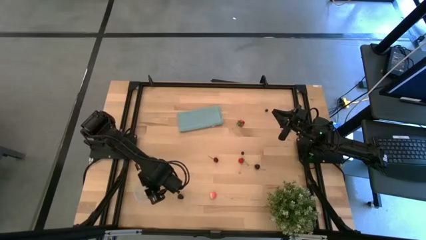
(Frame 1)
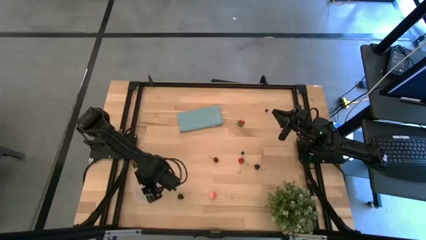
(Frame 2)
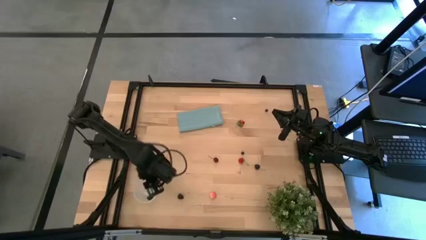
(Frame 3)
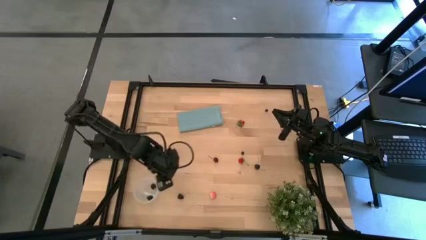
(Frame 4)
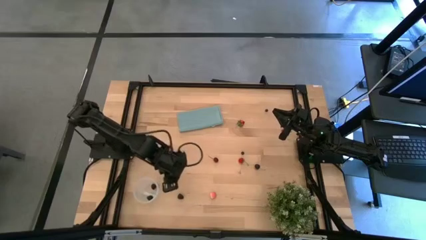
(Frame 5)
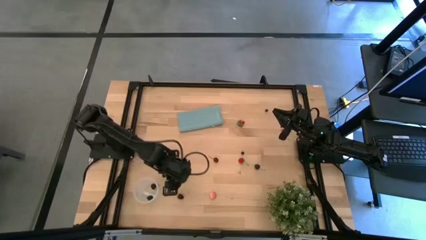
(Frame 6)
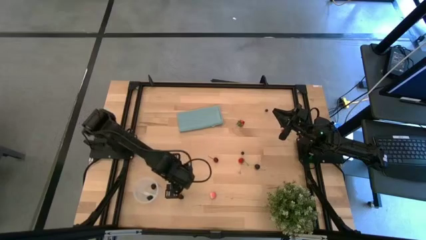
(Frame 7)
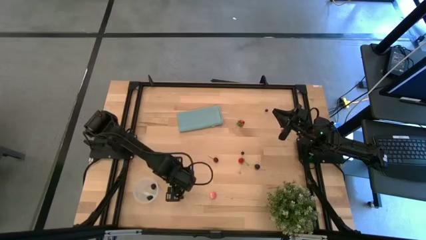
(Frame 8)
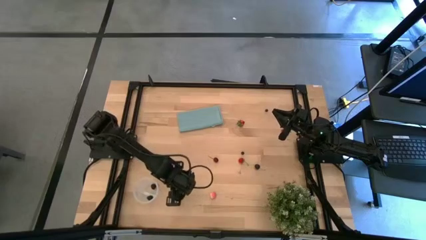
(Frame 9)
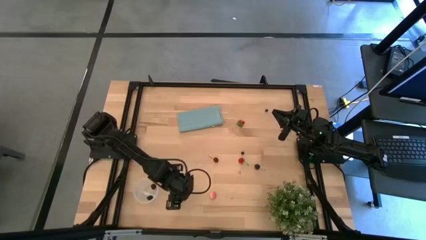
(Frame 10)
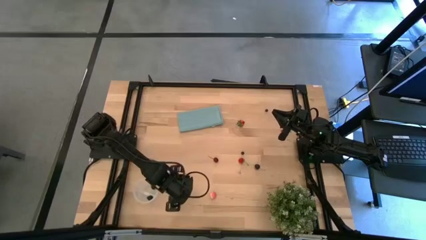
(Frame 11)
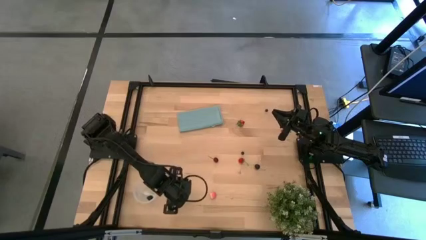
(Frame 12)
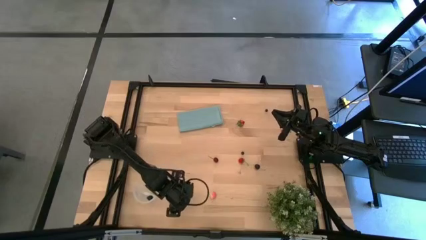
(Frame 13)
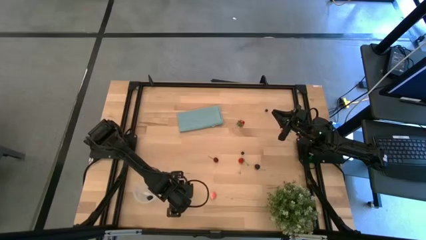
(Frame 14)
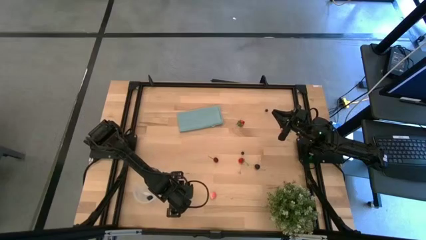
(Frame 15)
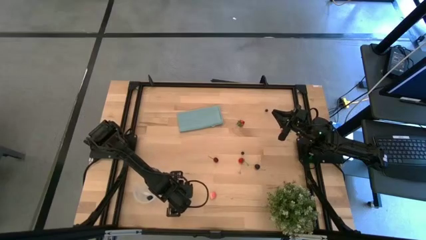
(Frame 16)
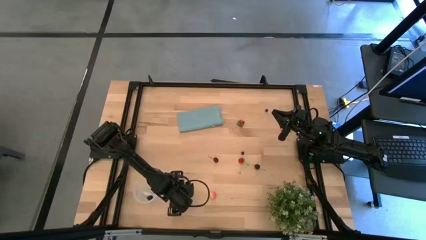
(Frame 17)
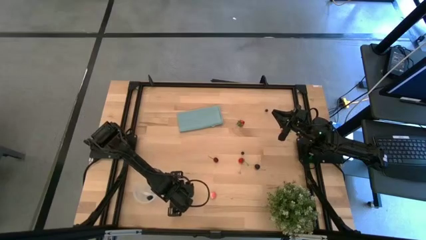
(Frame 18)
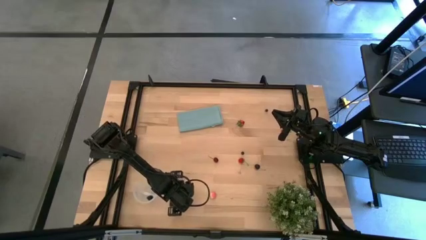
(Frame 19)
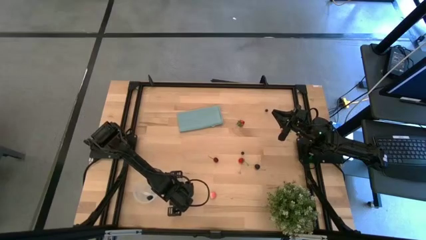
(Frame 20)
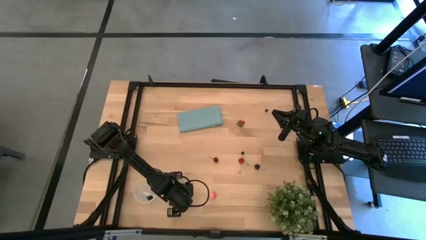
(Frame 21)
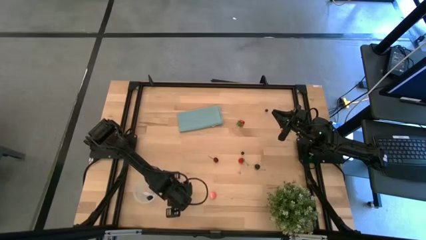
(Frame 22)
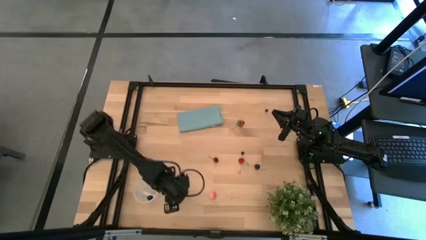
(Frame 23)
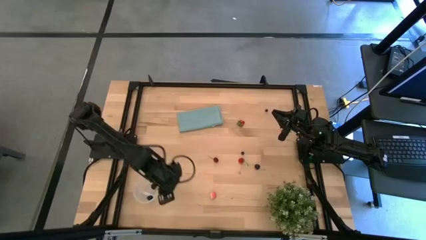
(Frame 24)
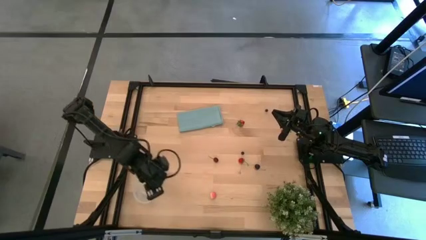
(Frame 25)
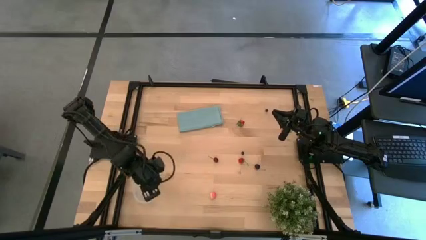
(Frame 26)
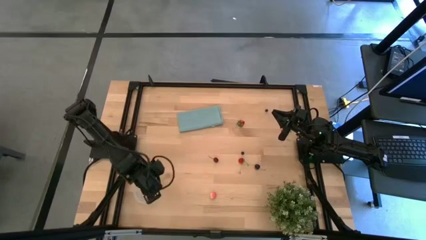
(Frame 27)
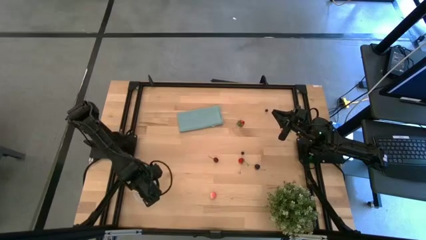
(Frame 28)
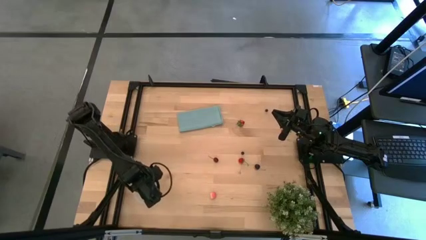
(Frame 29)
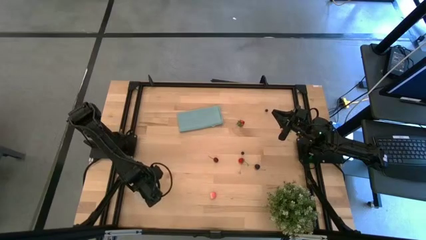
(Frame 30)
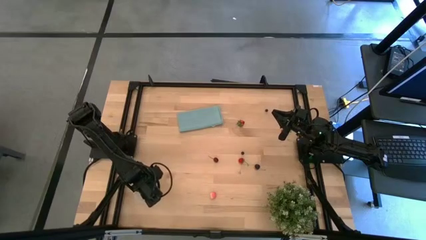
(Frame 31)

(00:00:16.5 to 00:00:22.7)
Task: Pick and placing Produce into tupperware
Put the blackberry into the transparent container

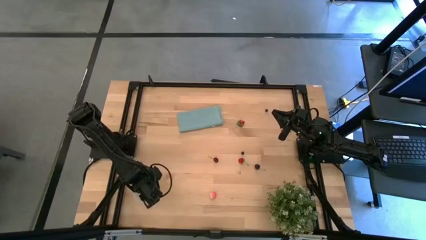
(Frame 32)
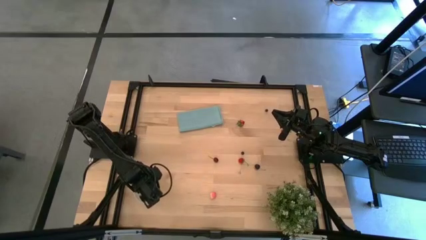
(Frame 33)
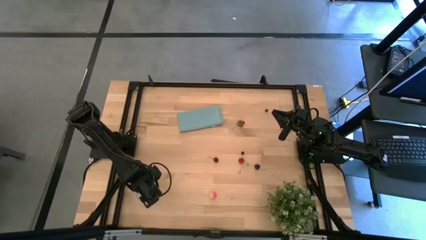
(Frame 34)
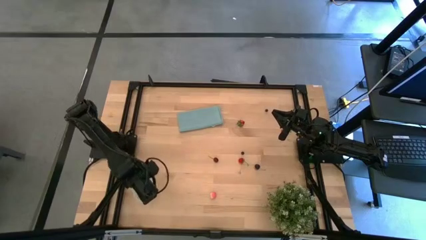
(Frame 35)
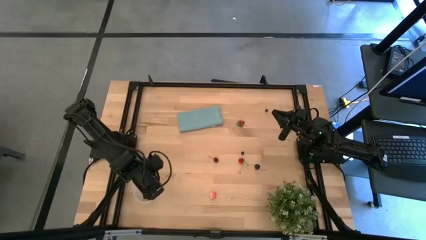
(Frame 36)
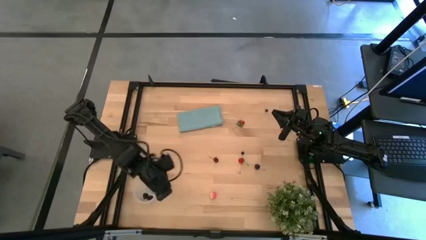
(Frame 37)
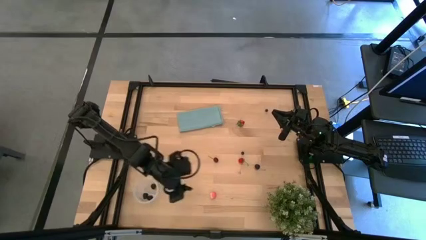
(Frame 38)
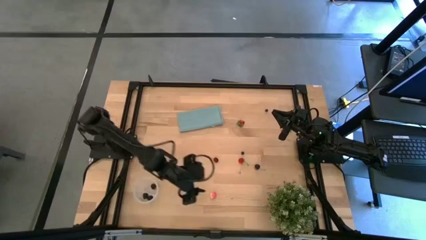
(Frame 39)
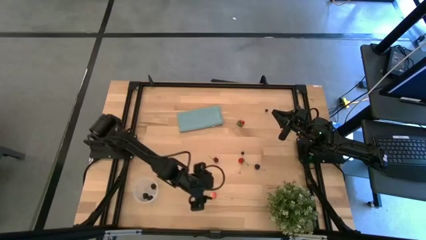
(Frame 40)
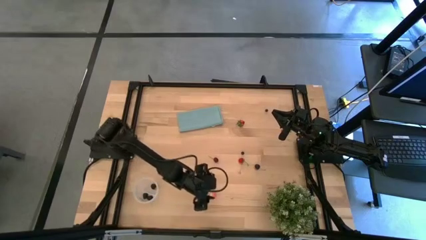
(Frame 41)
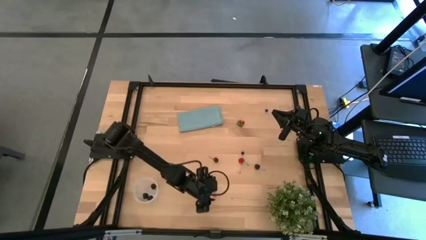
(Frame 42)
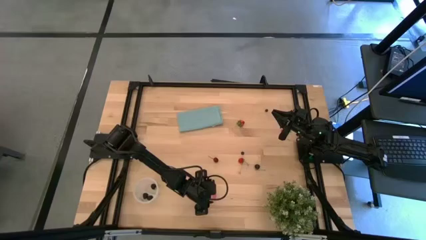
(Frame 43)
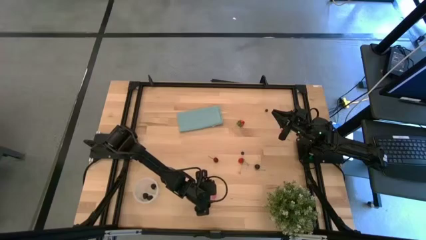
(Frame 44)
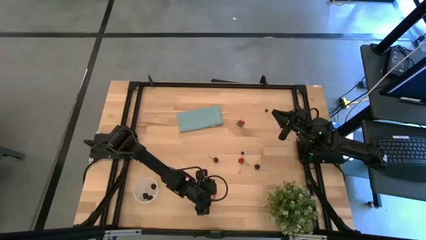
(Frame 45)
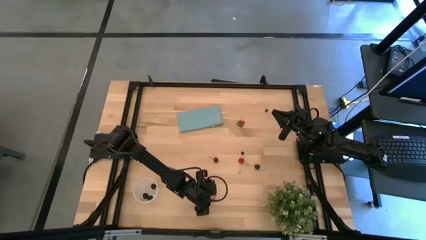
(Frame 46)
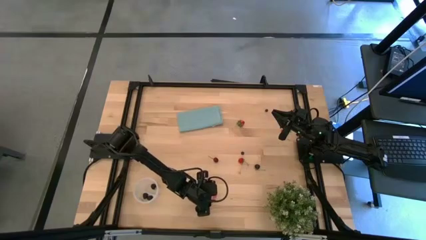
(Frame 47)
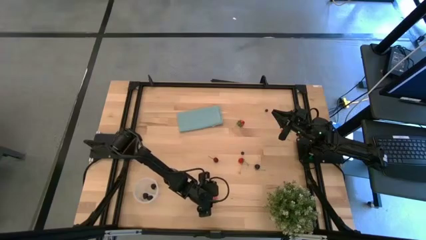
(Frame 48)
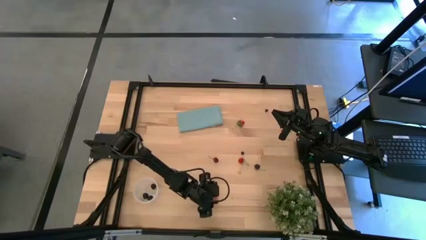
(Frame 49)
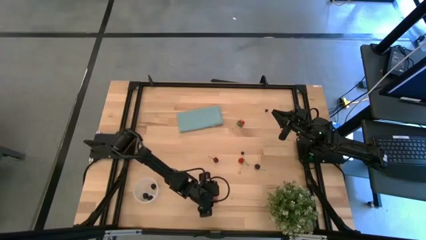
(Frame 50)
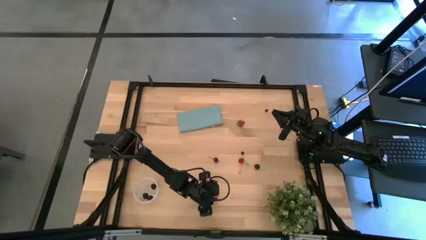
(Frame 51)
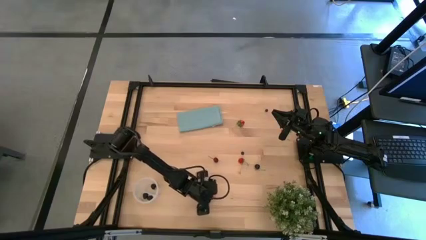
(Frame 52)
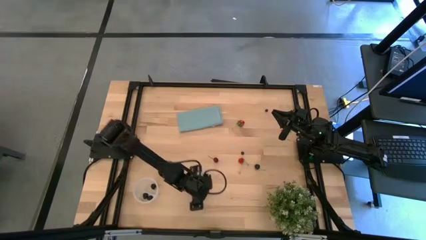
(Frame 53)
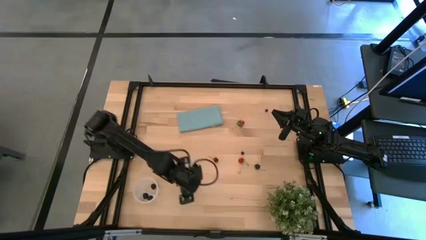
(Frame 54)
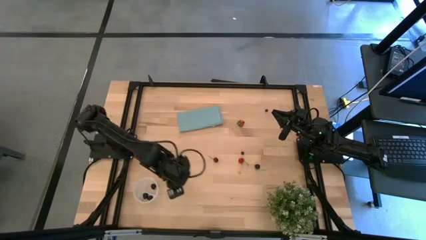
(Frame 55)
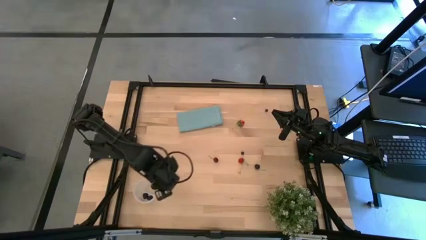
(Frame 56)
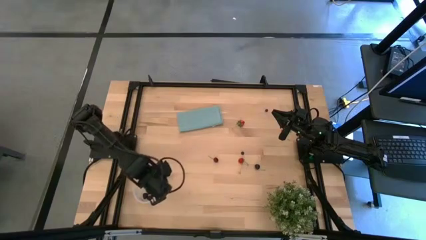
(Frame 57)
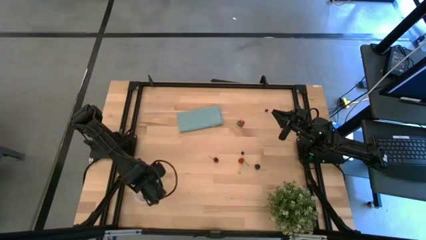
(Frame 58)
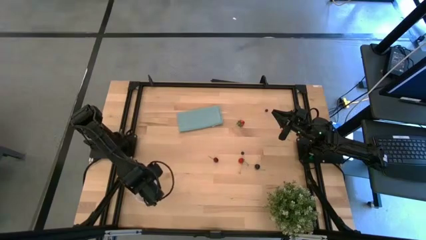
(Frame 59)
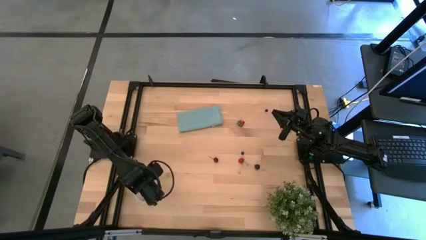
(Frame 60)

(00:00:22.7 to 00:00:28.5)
Put the peach into the transparent container

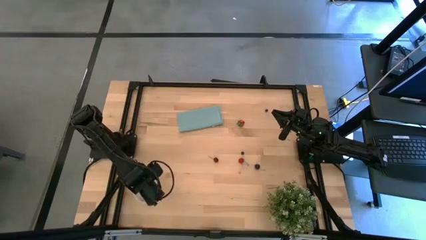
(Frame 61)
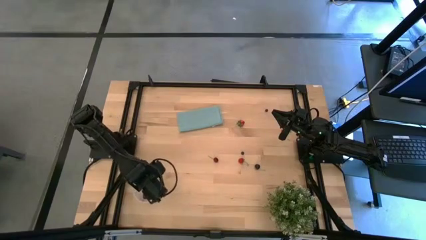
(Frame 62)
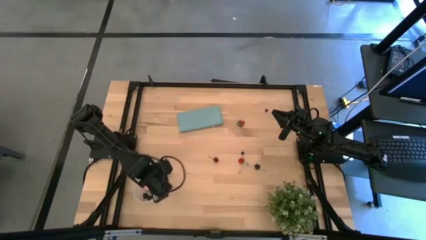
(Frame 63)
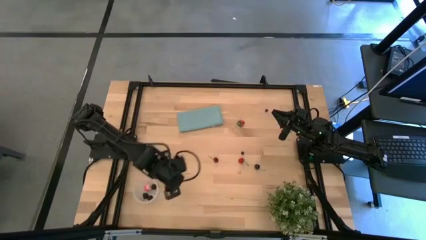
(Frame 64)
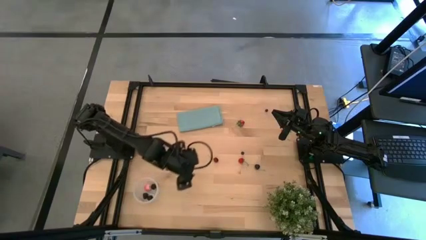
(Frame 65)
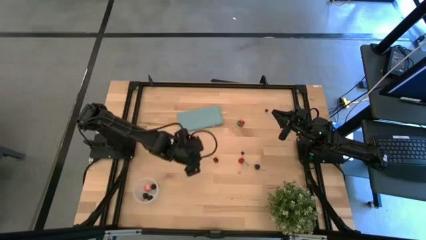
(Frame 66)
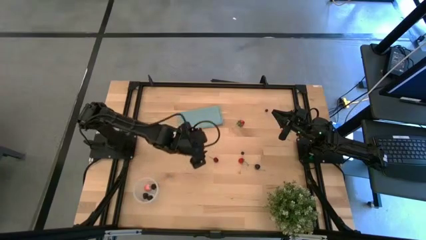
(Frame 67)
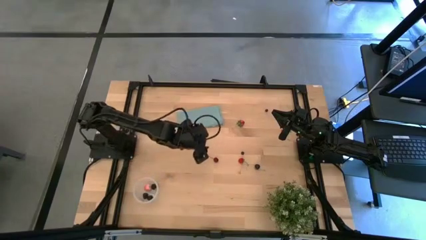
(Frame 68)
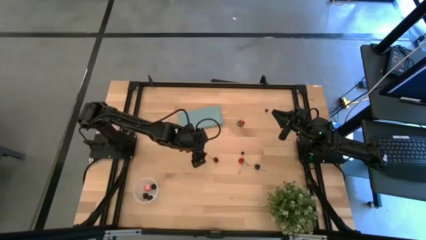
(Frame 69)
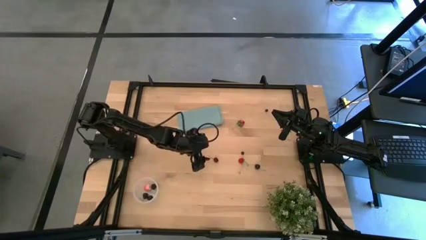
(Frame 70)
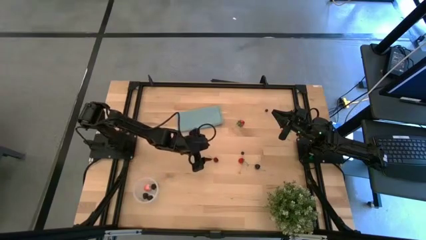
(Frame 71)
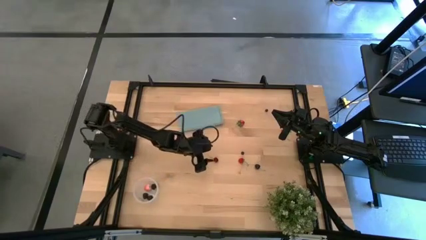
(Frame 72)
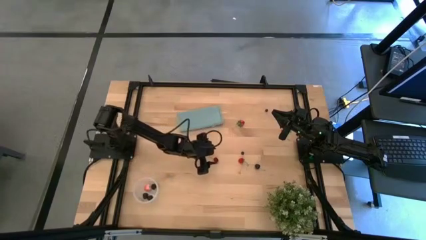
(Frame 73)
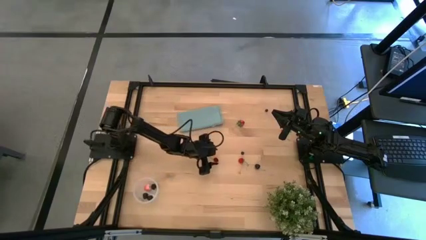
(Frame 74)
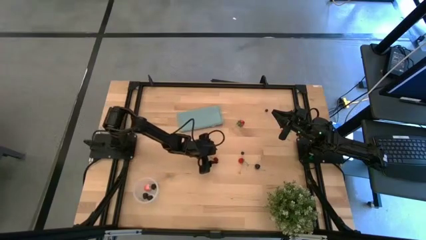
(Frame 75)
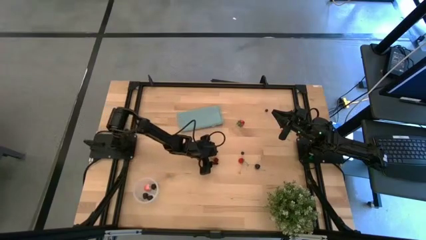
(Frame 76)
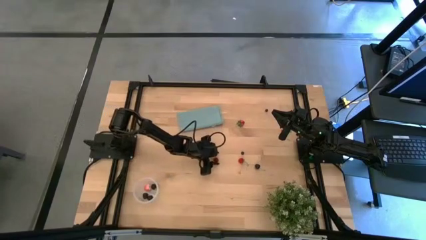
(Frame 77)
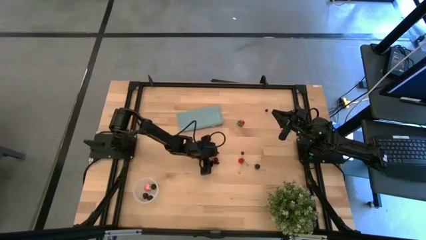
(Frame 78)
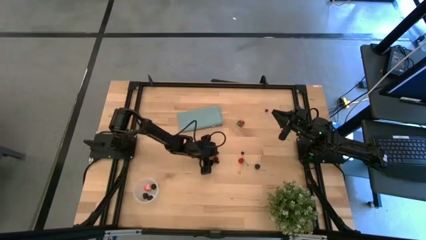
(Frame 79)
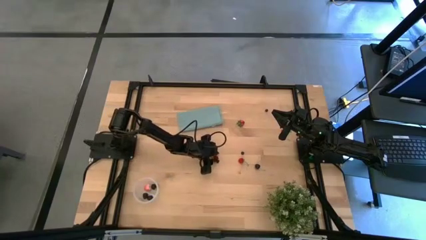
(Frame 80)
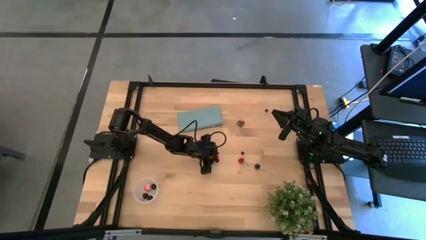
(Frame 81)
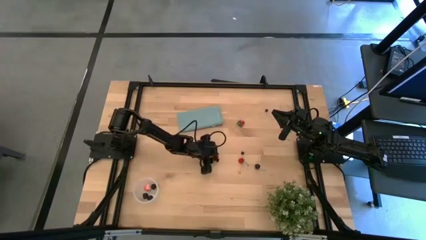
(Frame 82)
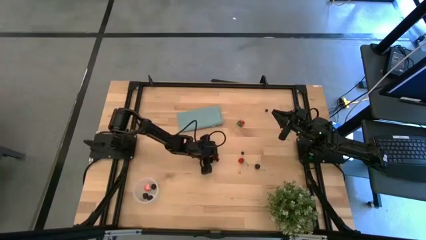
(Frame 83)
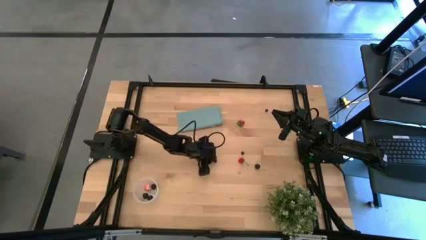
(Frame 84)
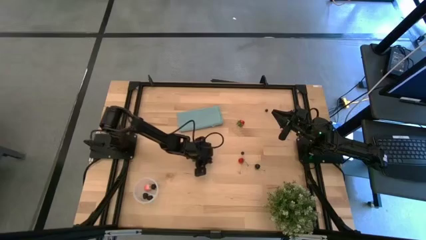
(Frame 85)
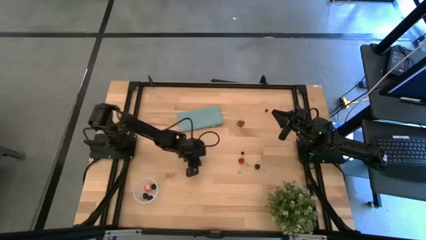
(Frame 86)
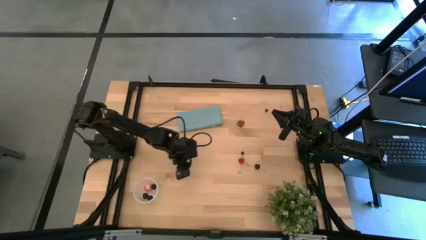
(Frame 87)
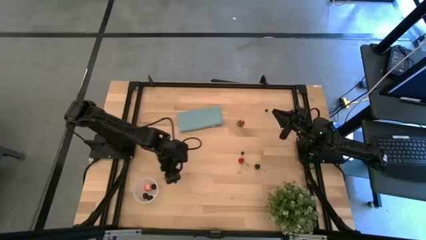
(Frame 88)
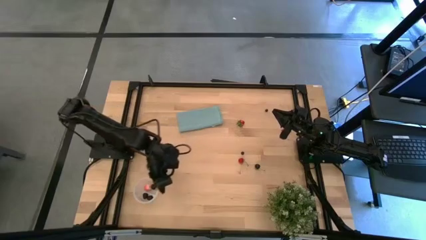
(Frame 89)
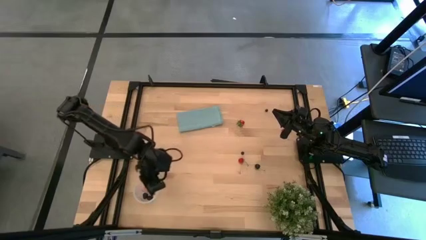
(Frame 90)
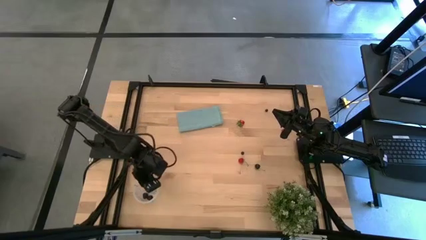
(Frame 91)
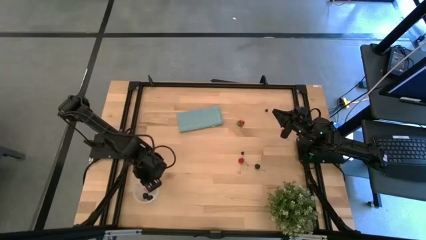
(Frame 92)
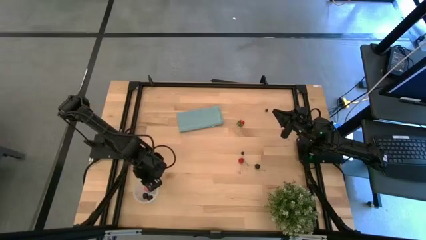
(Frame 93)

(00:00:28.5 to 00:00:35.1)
Put the red cherry into the transparent container
